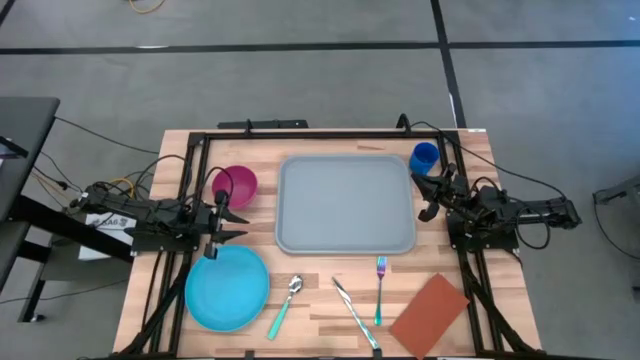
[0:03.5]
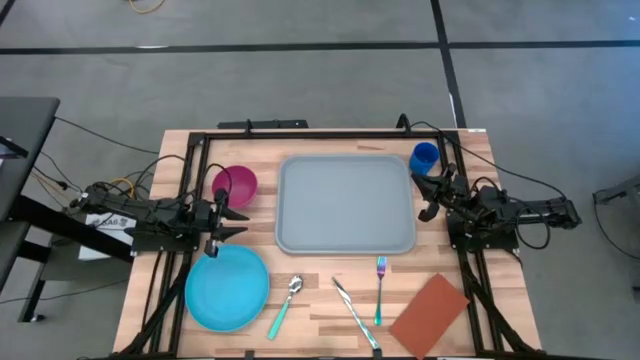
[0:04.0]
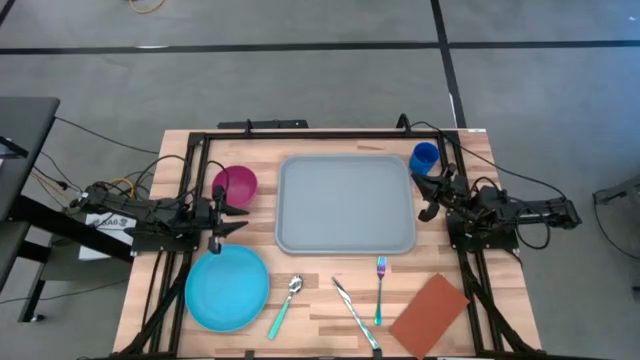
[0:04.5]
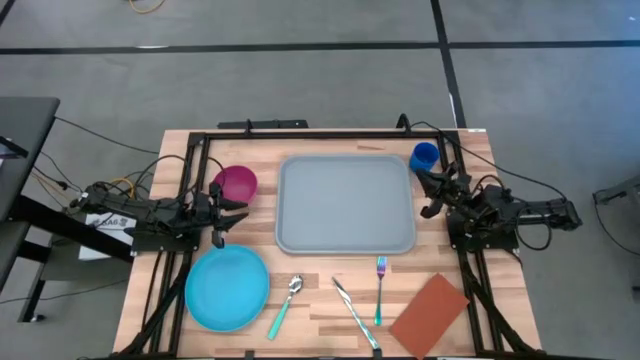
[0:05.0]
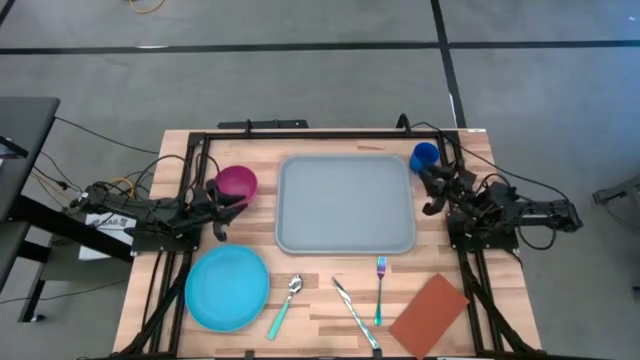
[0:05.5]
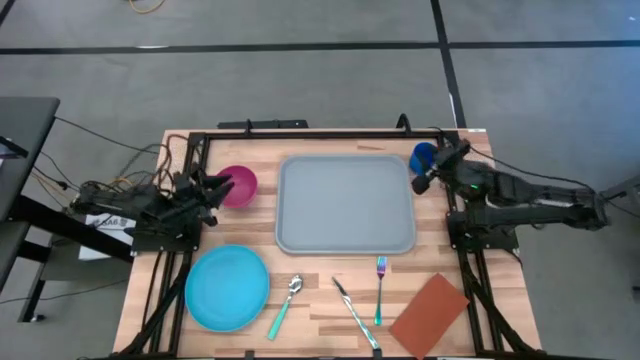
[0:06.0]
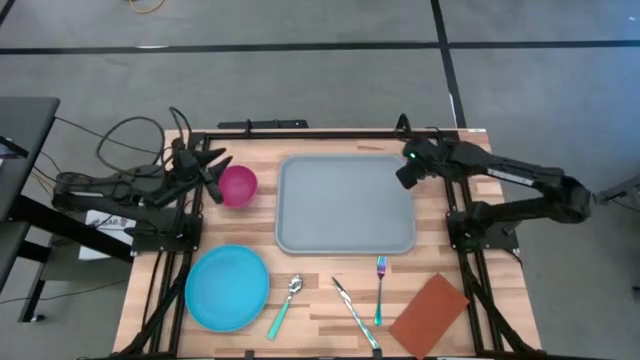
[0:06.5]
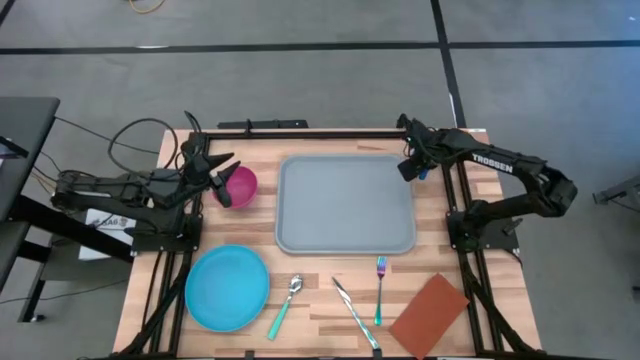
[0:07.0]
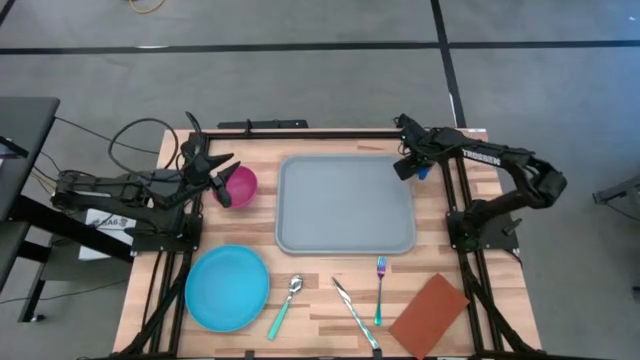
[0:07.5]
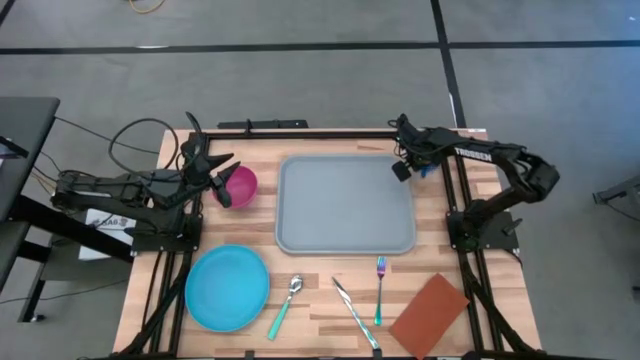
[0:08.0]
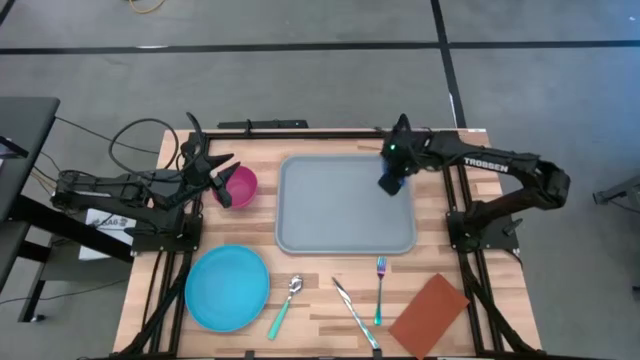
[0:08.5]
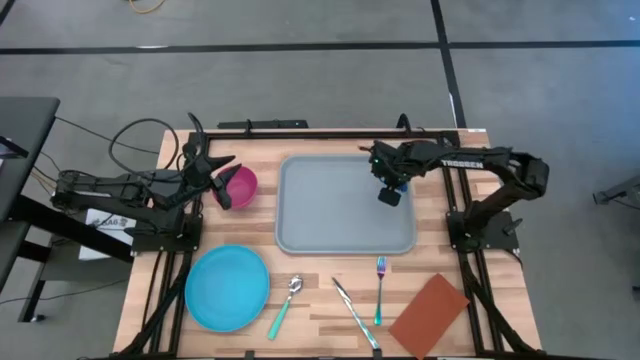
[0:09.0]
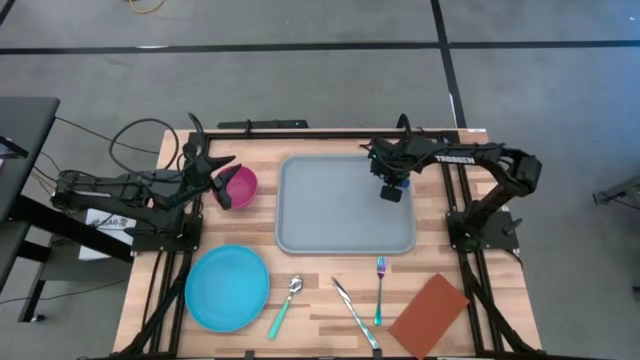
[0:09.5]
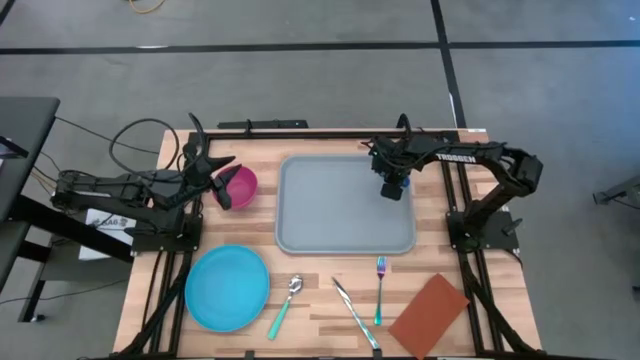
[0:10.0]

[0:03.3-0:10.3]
Task: Set up tray
Put the blue cup on the tray

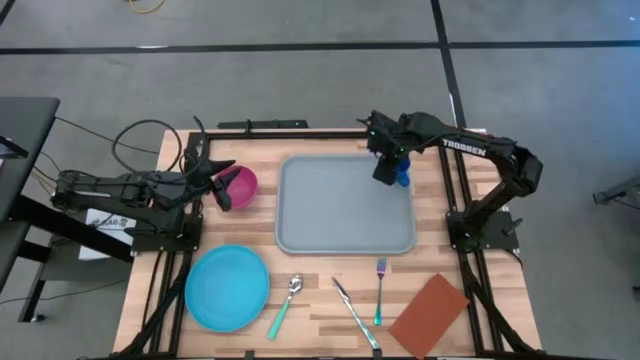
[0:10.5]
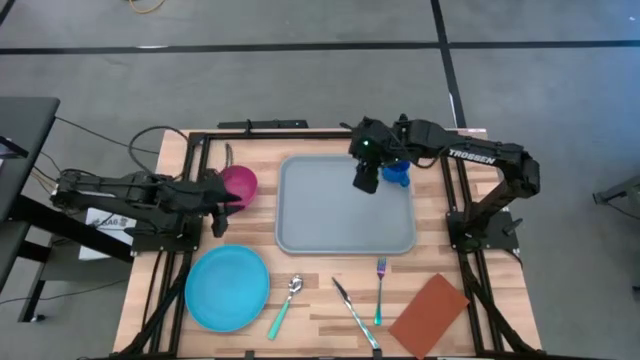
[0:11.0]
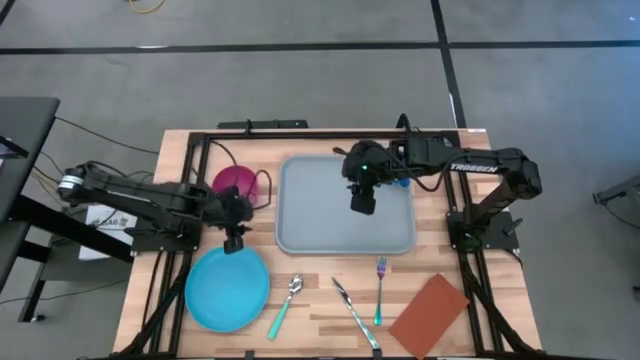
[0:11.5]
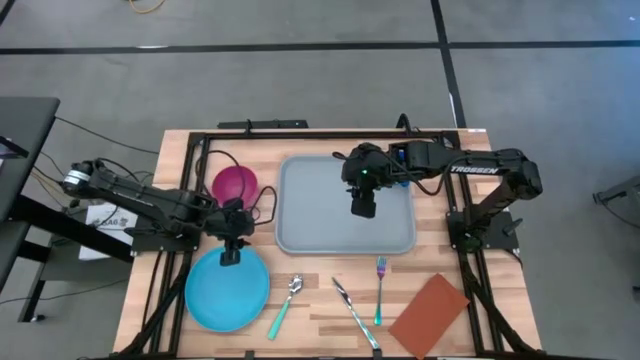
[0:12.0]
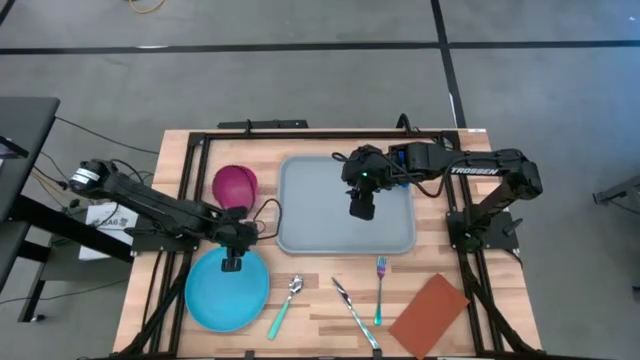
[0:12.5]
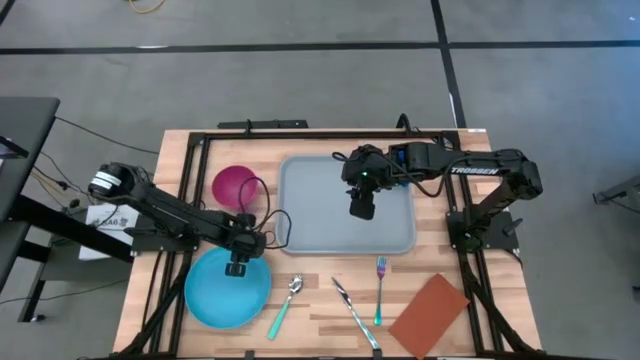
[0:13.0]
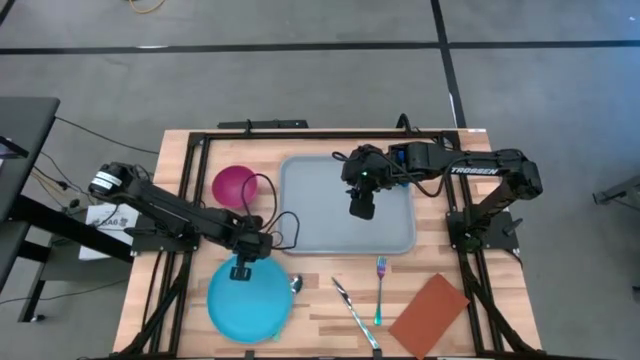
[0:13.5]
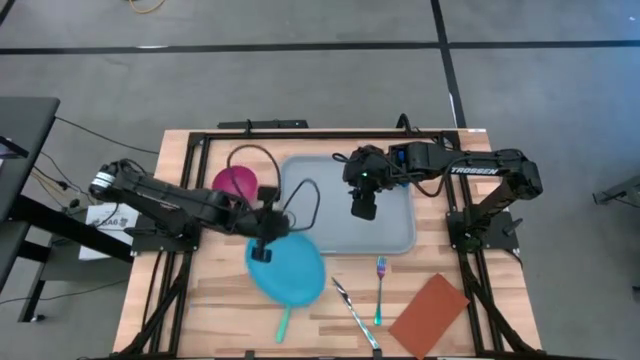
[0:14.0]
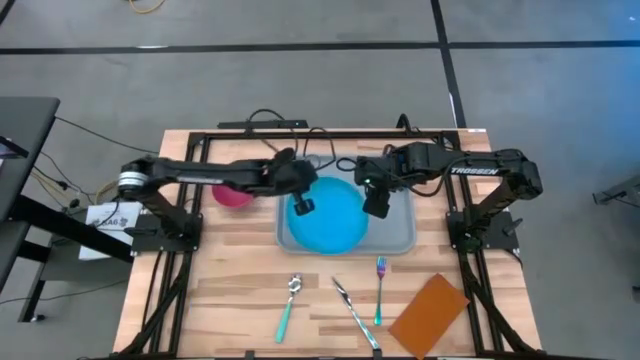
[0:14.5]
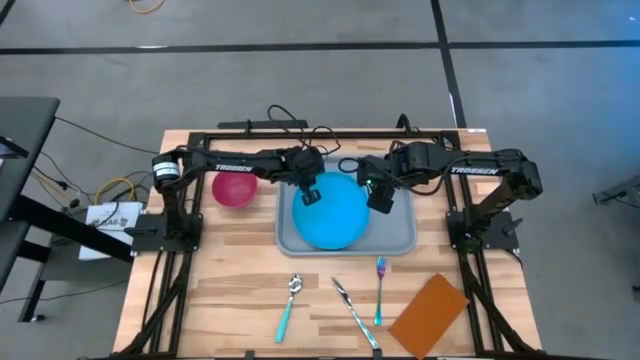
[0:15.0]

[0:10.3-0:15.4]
Put the blue plate on the tray

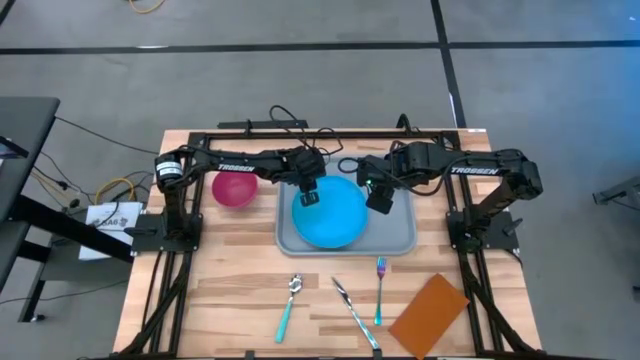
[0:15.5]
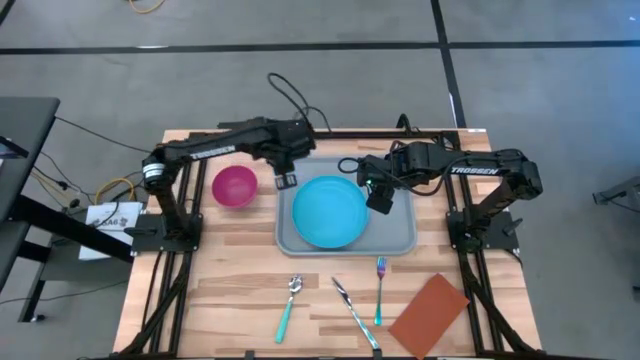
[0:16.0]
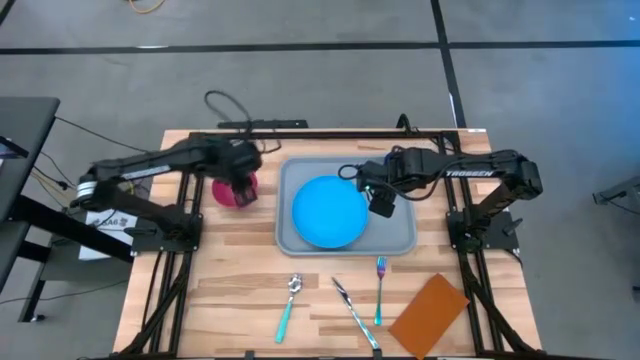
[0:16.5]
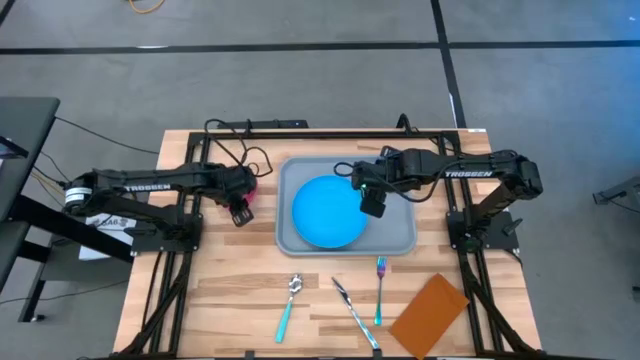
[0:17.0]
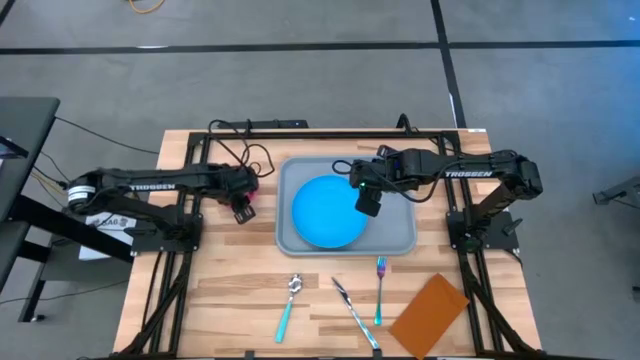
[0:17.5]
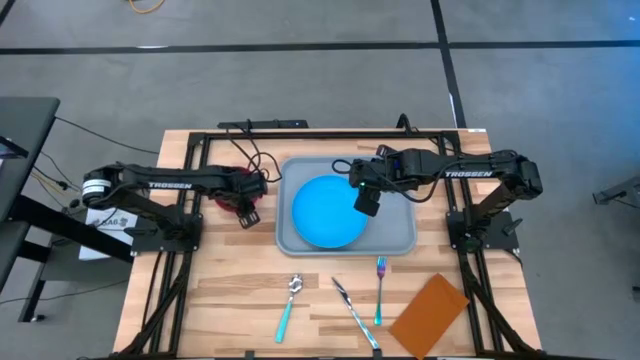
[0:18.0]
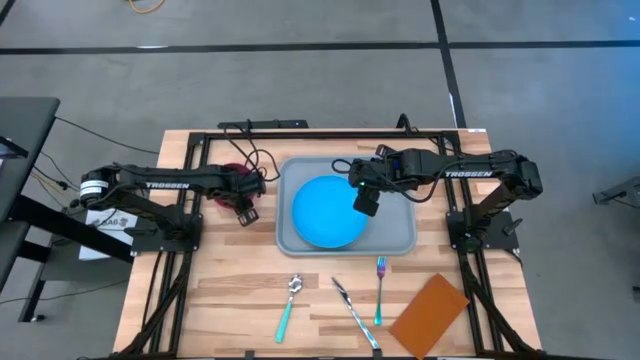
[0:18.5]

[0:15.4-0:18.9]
Put the pink bowl on the blue plate

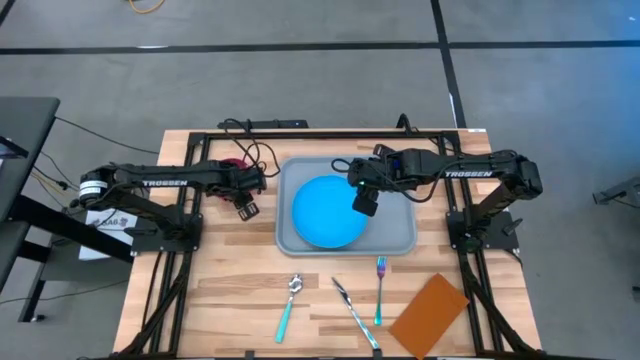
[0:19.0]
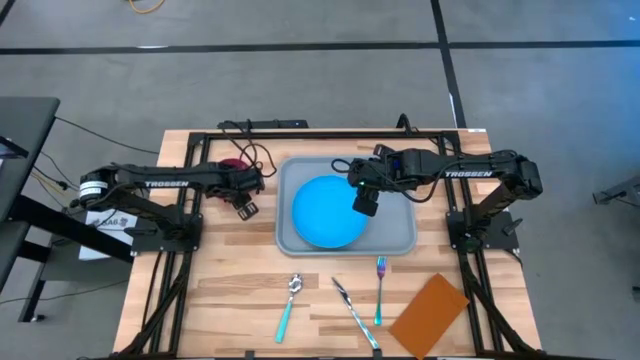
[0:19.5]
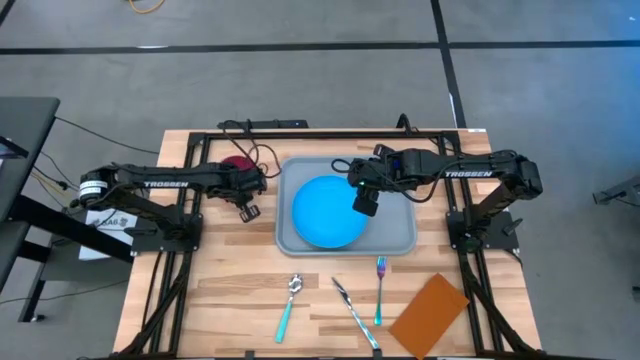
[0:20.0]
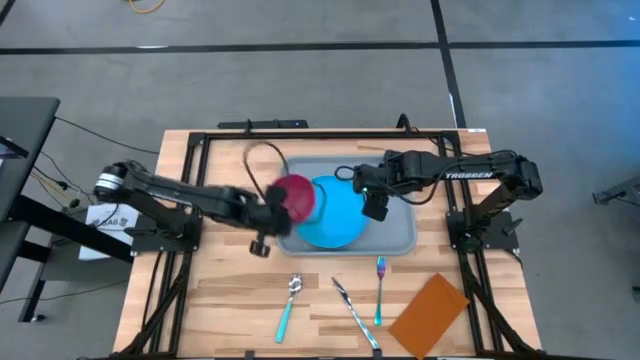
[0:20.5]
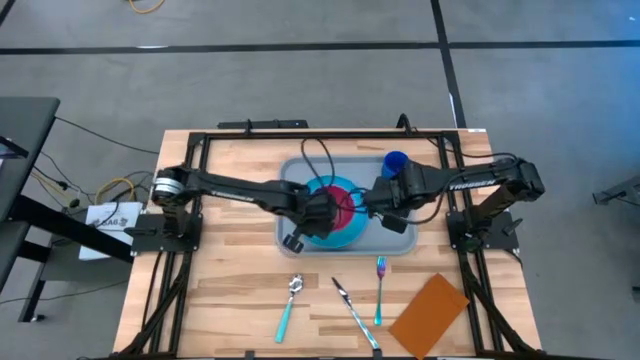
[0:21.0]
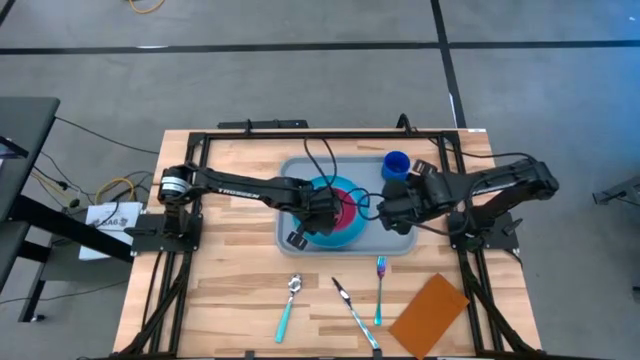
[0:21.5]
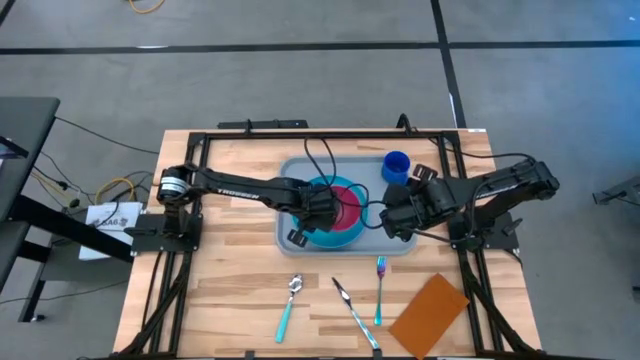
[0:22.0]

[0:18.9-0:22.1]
Put the pink bowl on the blue plate

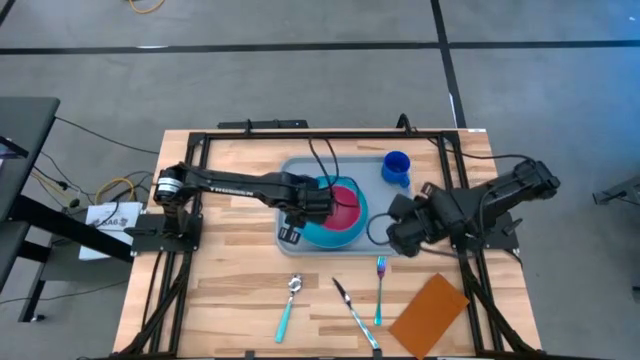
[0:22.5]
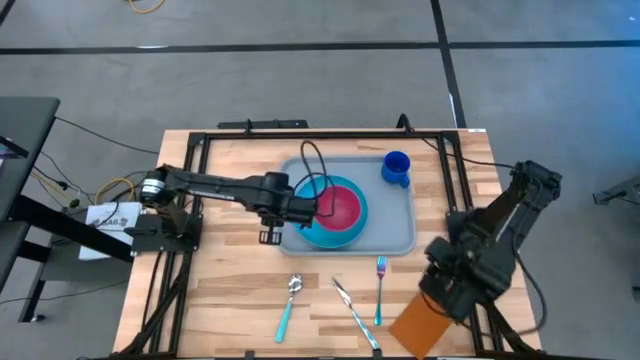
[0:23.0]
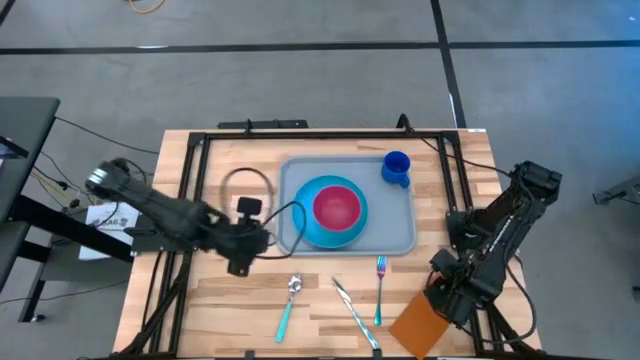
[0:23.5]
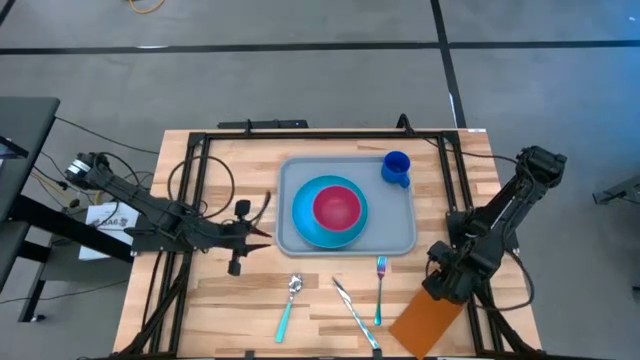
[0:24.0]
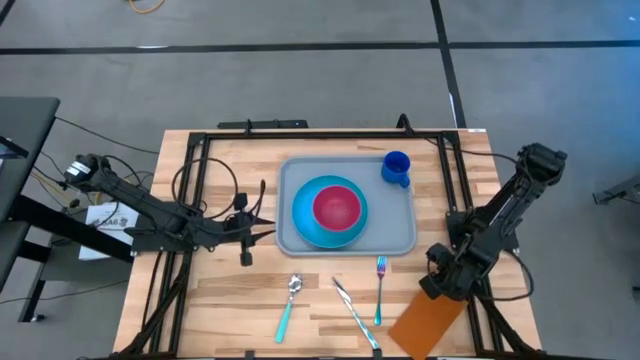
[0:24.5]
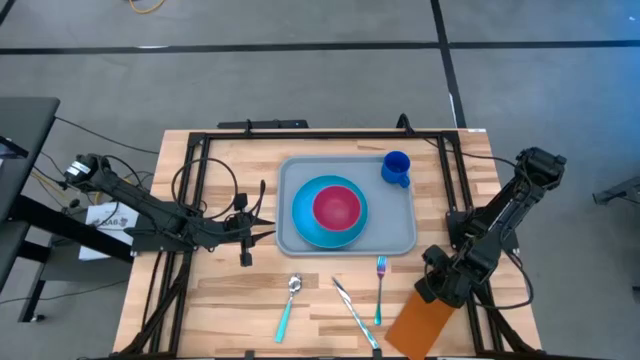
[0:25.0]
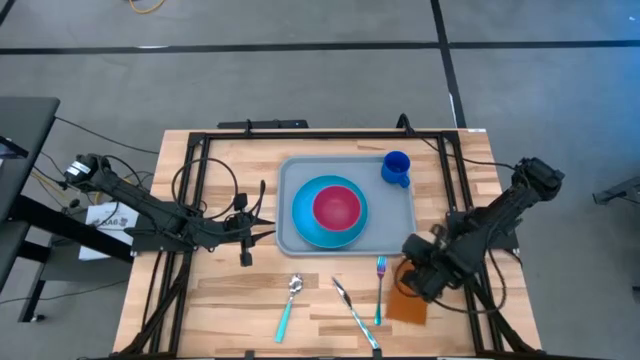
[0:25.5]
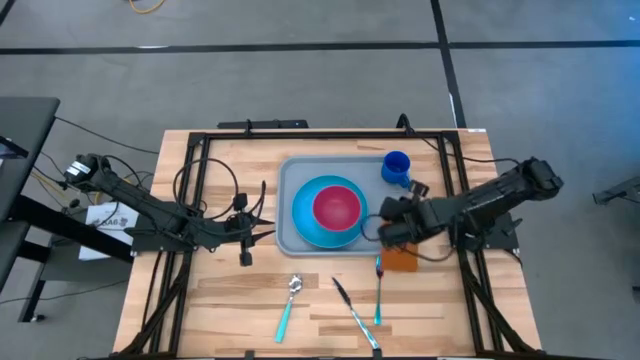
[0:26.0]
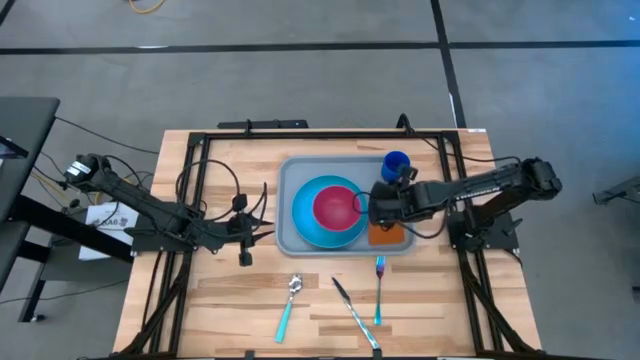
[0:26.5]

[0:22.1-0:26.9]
Put the brown napkin on the tray to the right of the blue plate
